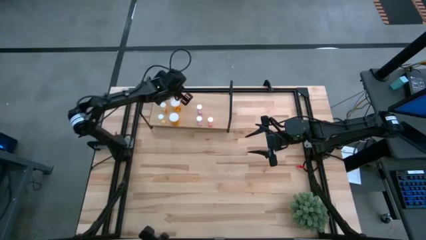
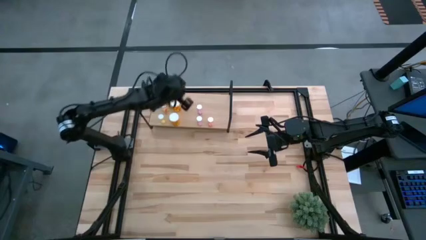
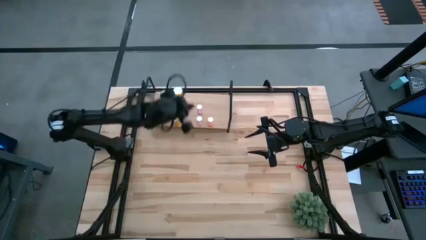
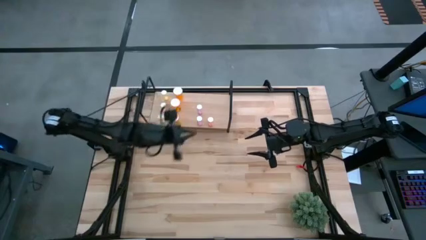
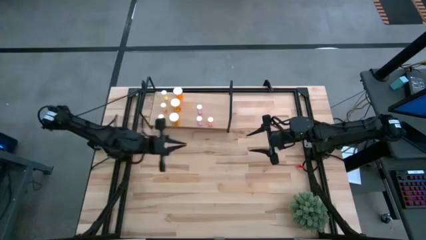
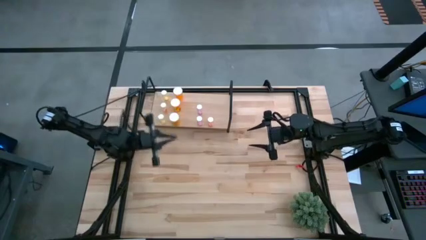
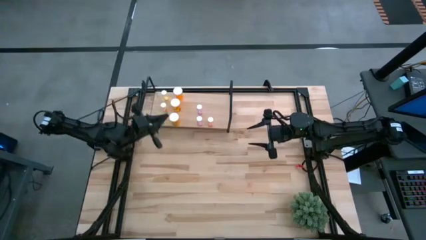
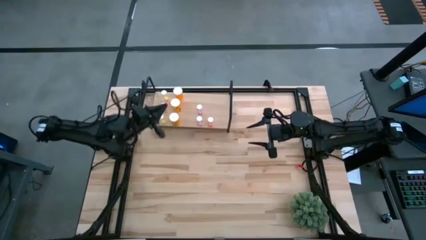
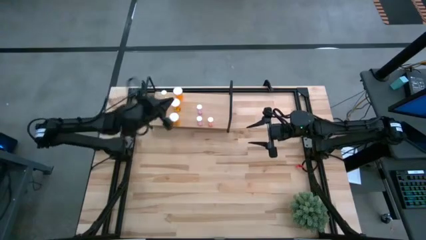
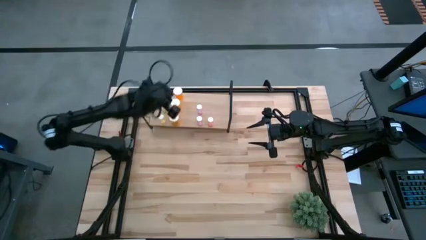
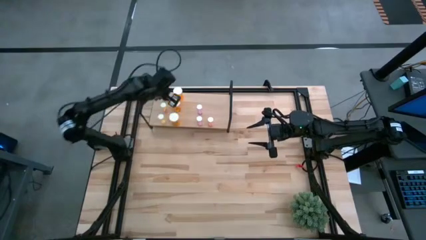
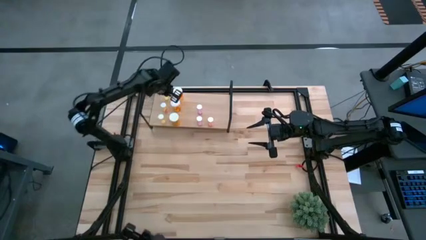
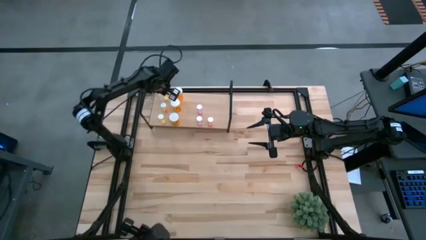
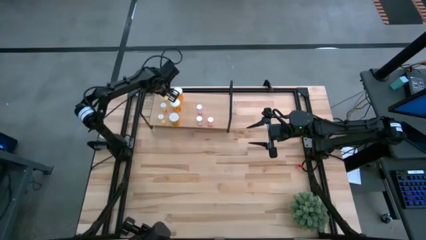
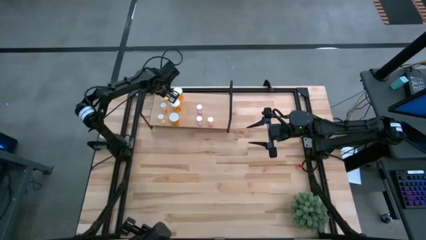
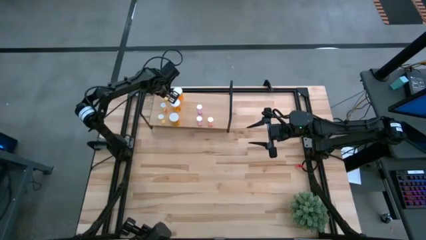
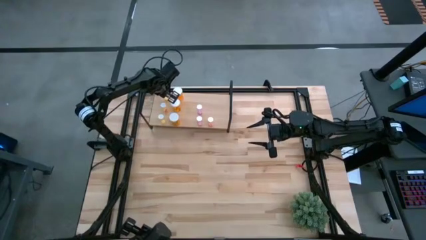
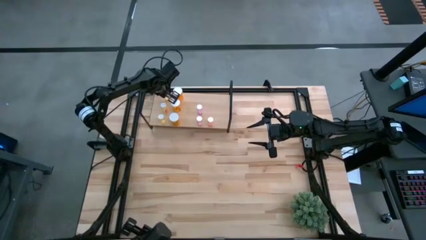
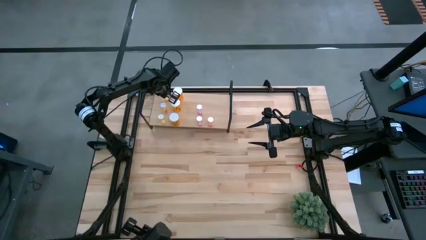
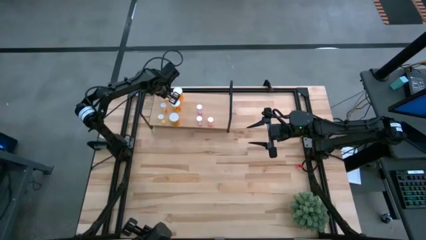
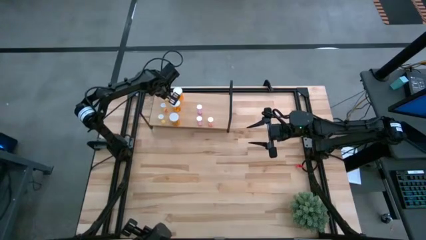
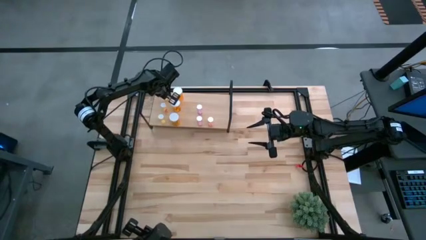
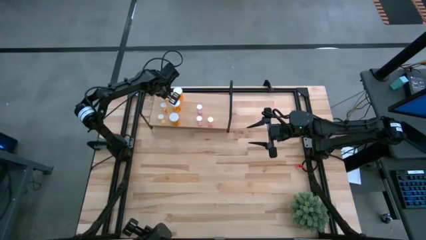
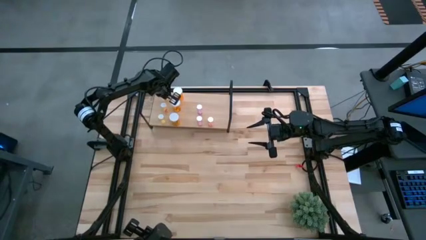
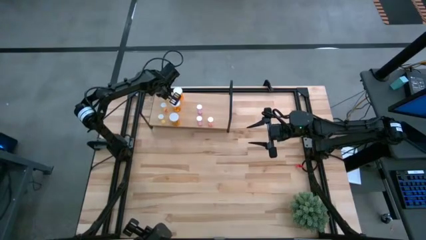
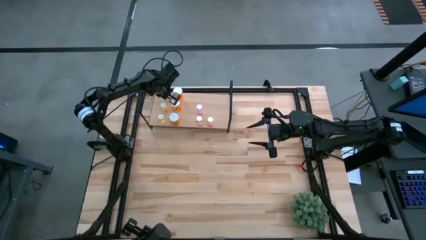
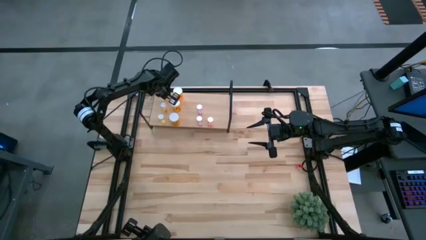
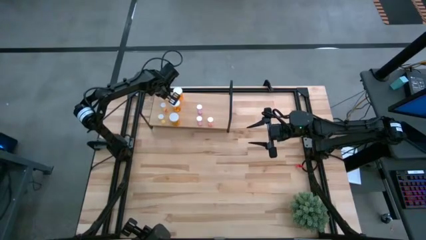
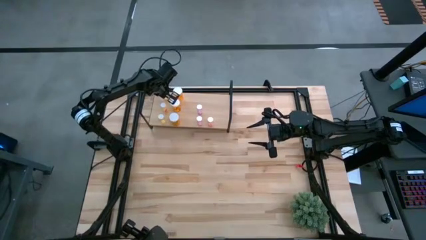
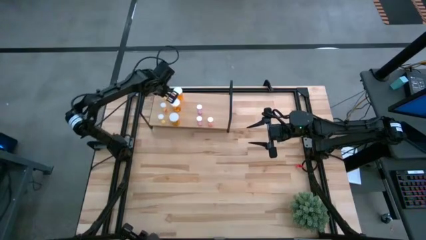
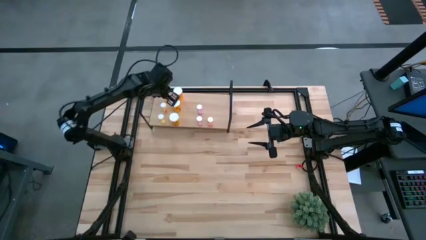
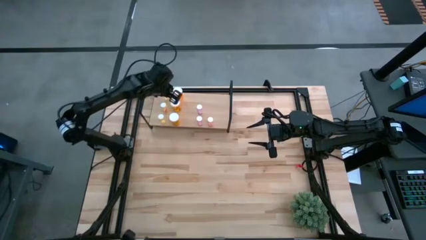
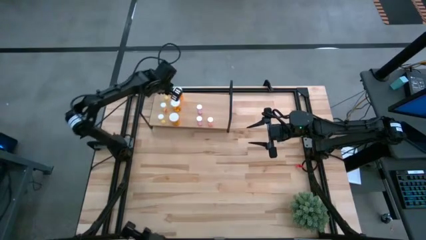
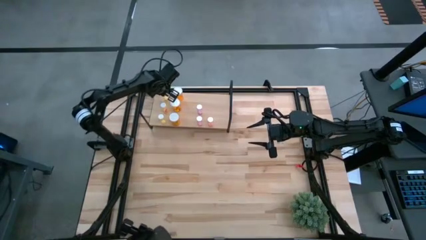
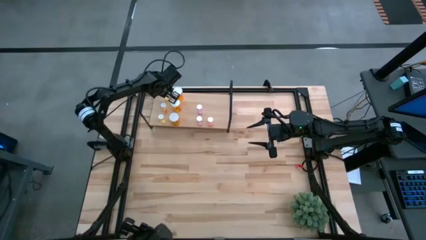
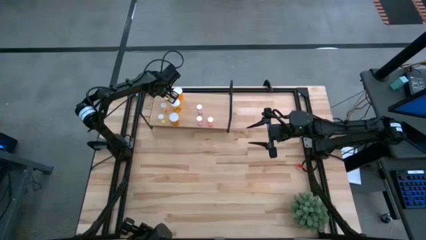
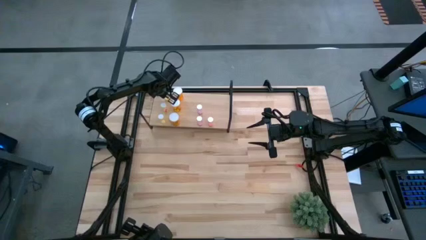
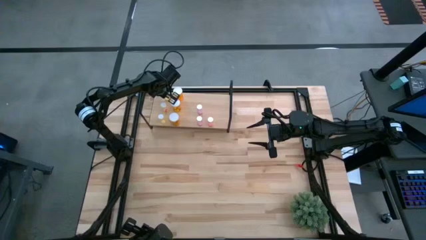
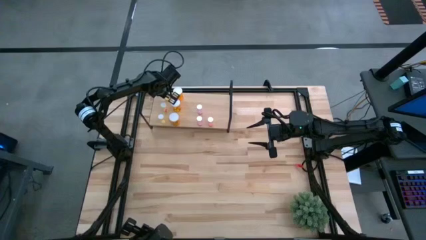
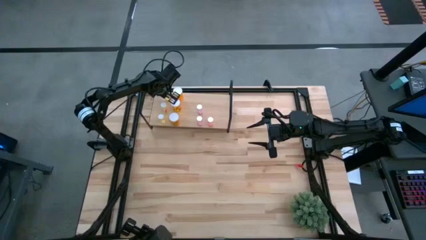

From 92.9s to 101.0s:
Task: Pick and place medicine bottles onto shelf by color
Adjust the yellow pill bottle on the shelf

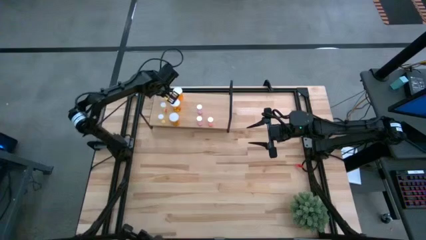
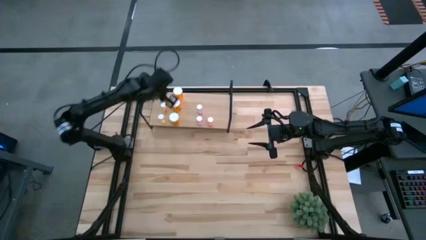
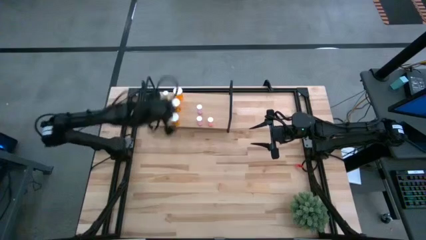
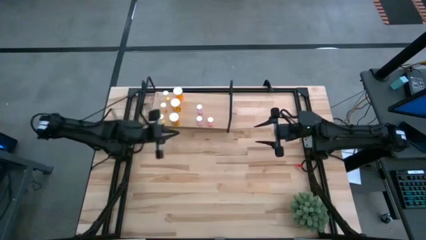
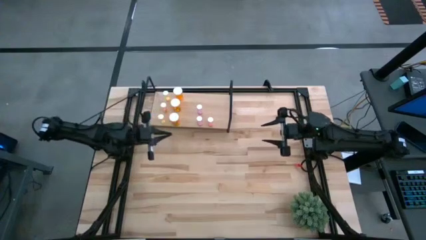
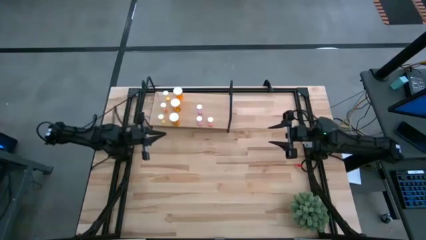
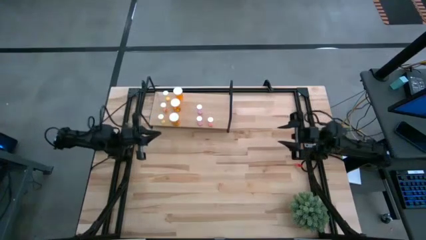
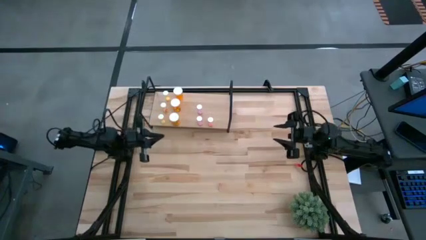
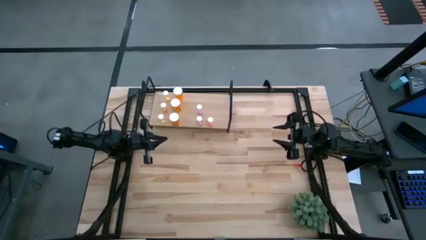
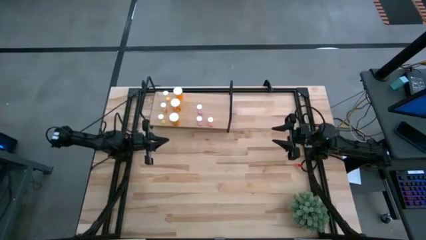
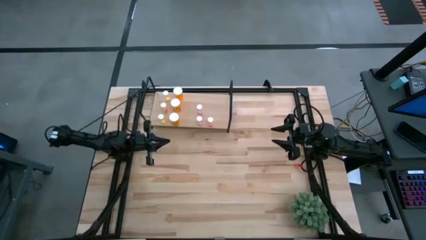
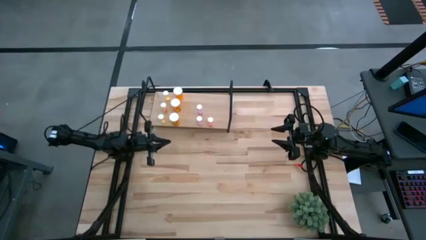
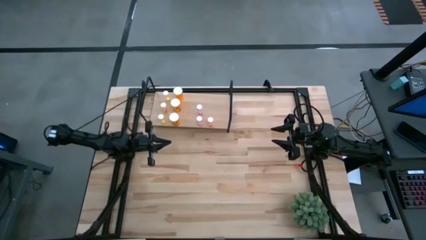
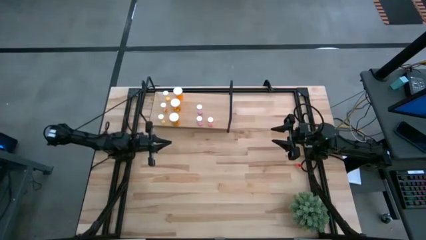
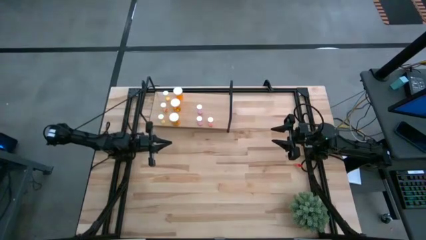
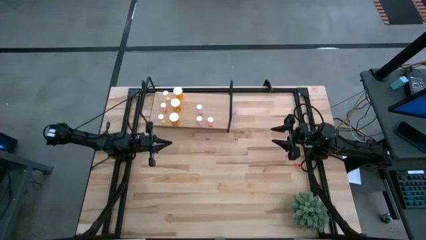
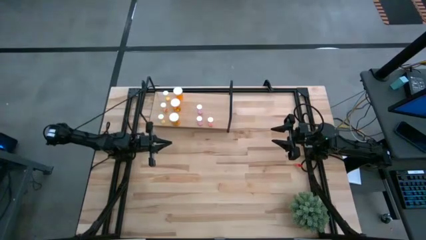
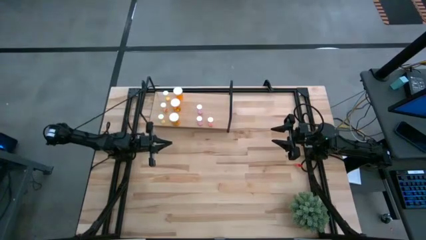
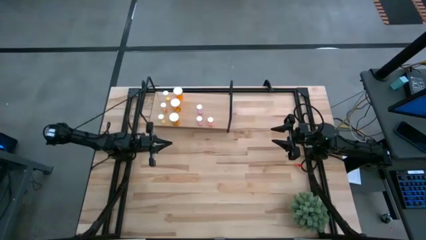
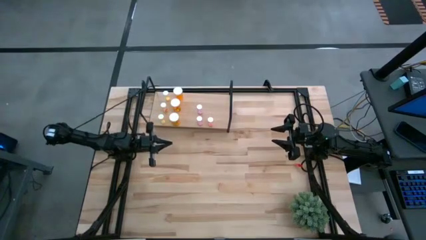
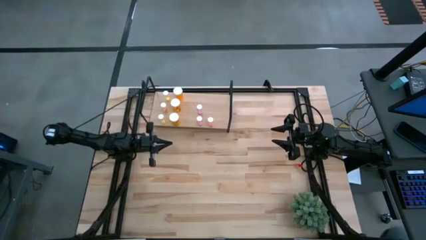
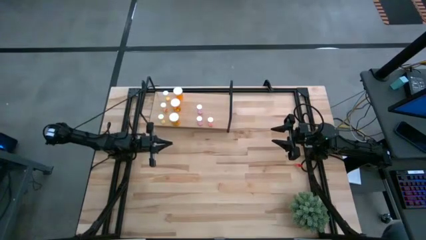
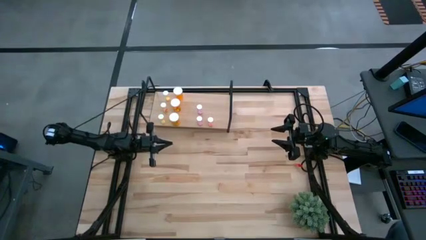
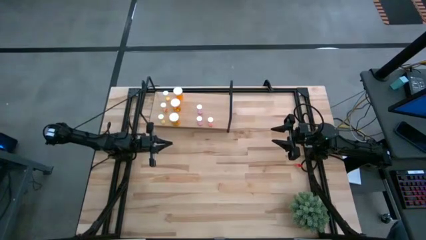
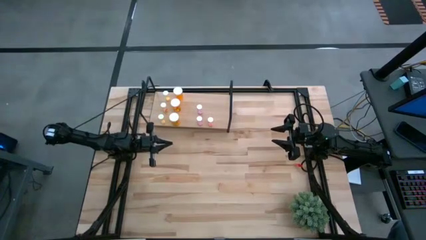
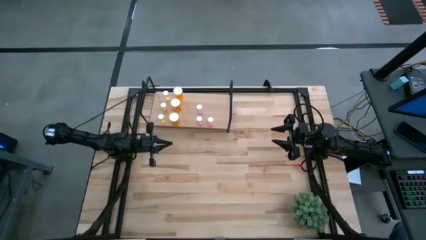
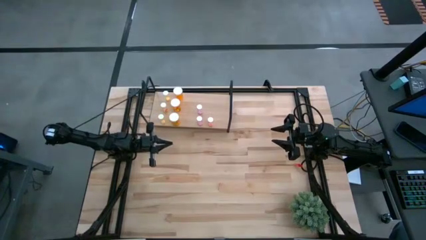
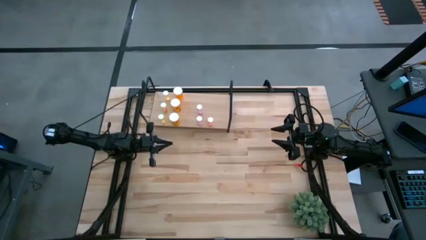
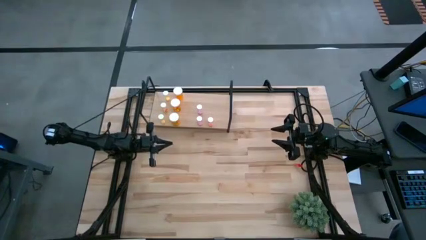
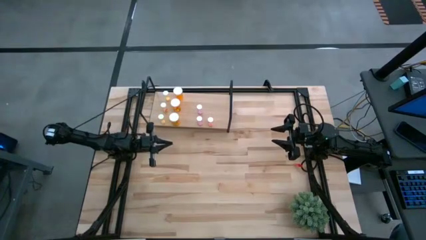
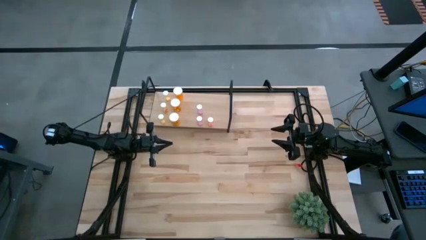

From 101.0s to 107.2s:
Return to Home Position

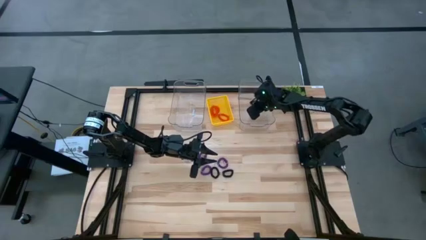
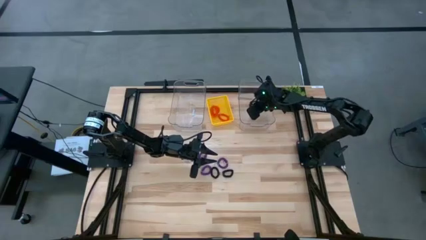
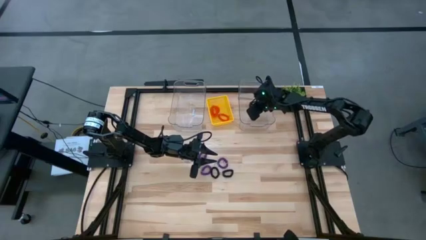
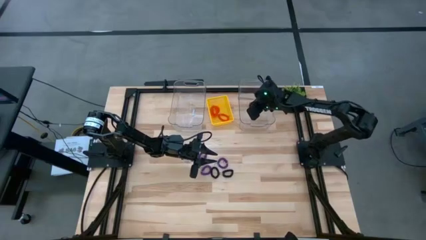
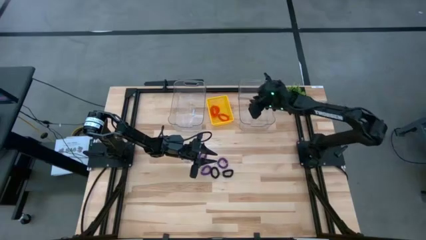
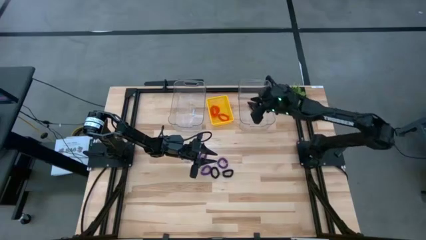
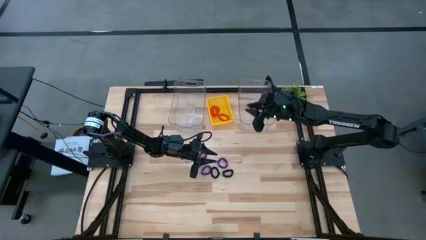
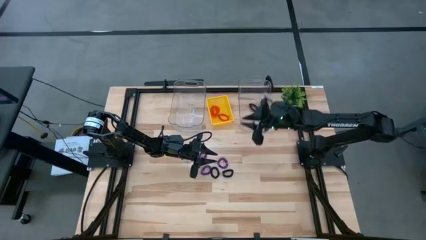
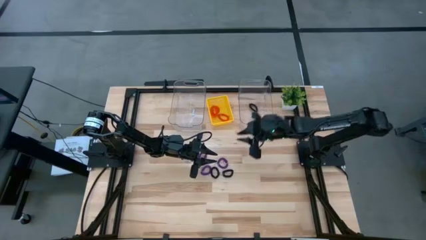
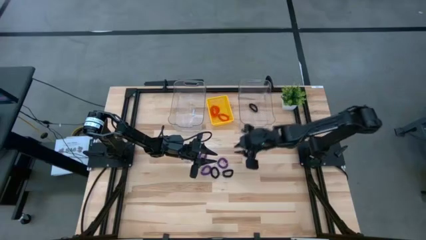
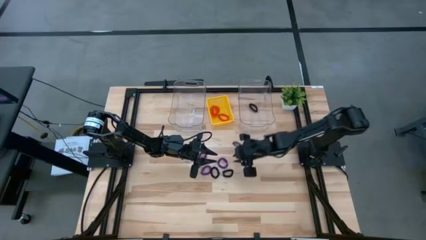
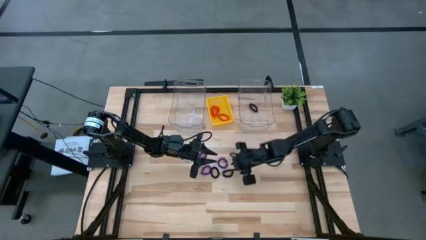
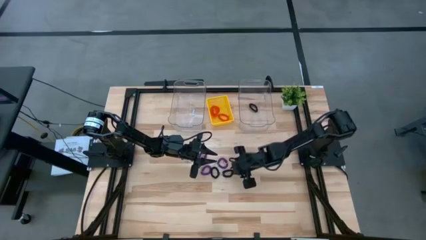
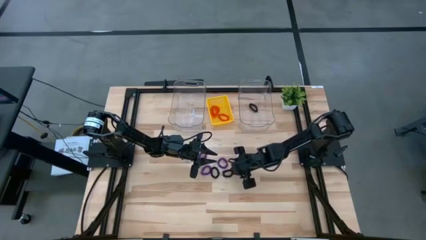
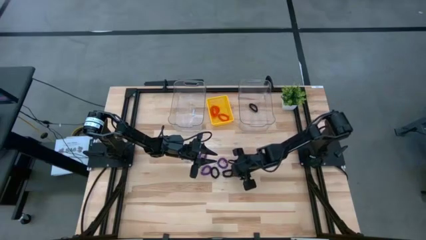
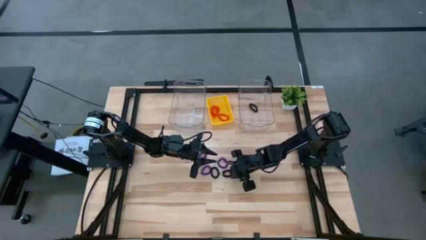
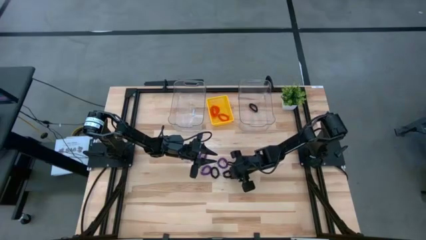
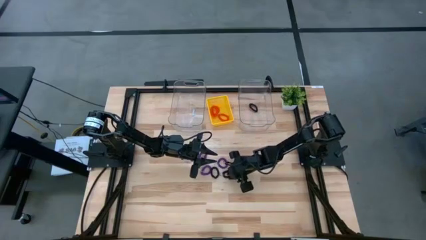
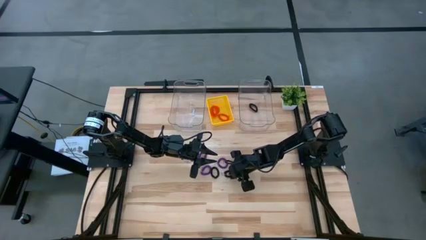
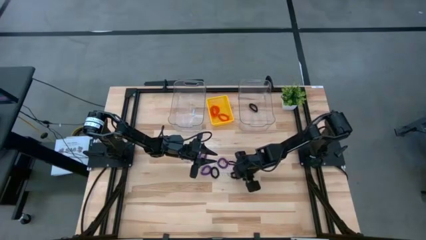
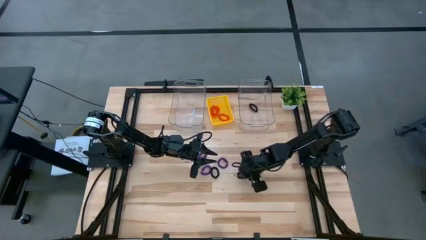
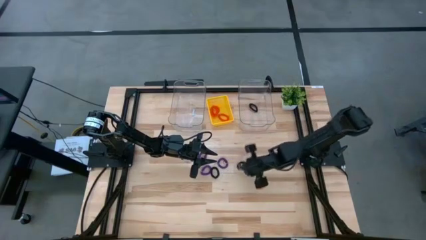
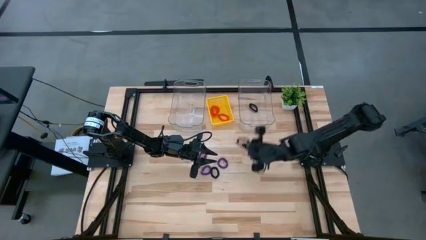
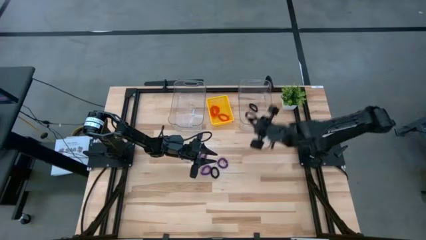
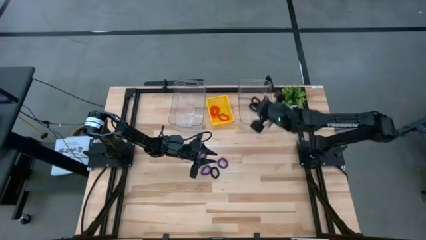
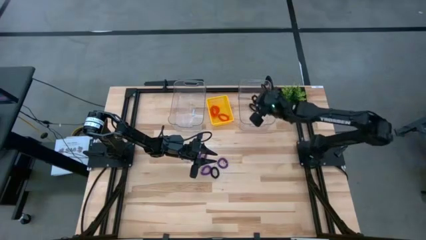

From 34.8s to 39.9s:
Task: Sort spring keychains
Put the right black spring keychain into the right transparent bin
